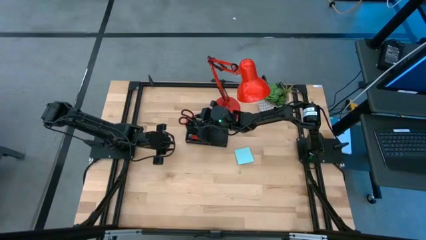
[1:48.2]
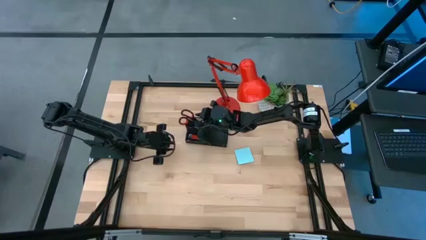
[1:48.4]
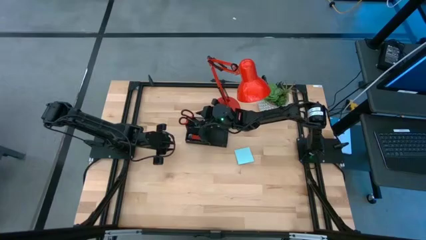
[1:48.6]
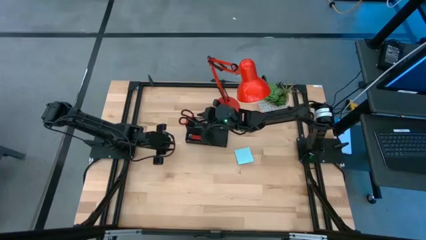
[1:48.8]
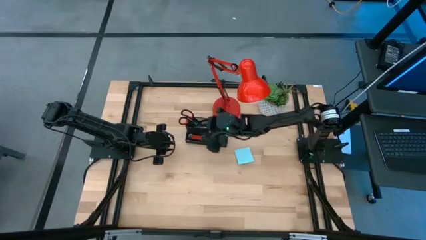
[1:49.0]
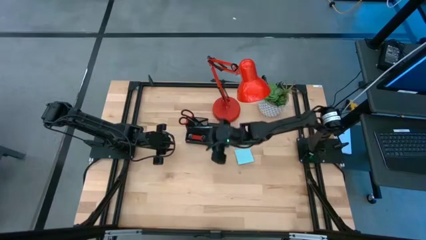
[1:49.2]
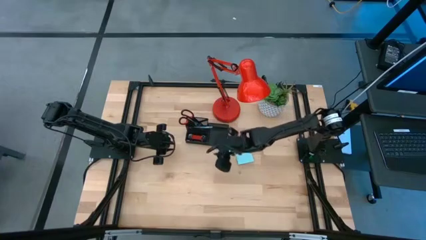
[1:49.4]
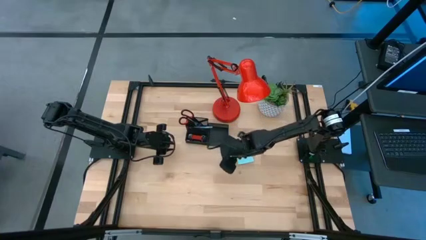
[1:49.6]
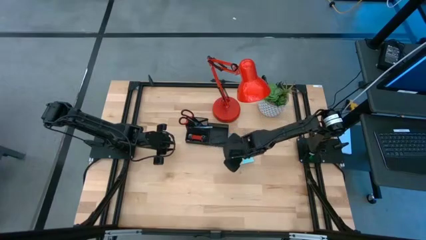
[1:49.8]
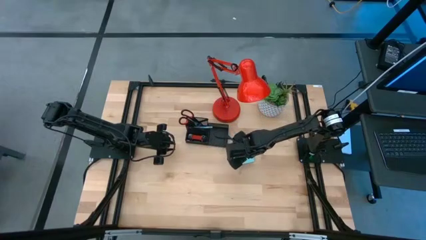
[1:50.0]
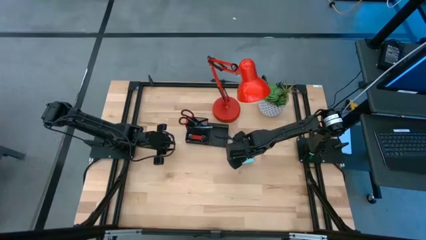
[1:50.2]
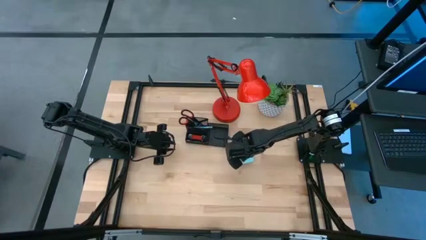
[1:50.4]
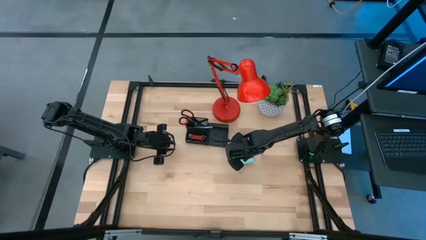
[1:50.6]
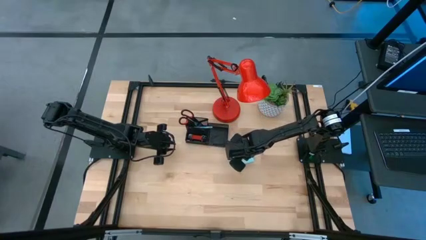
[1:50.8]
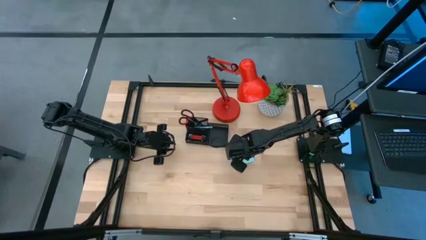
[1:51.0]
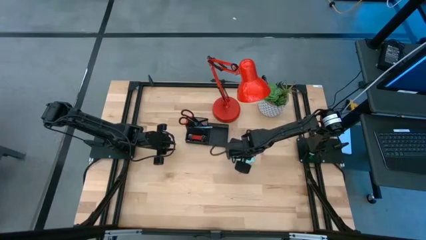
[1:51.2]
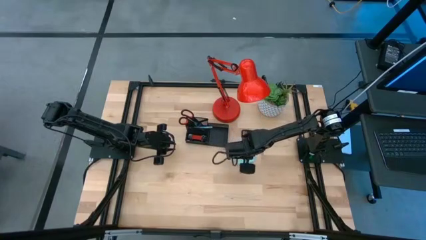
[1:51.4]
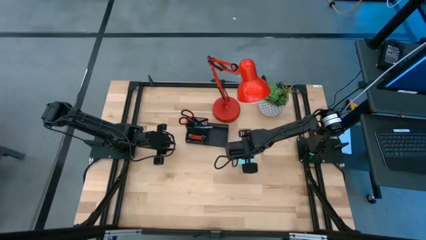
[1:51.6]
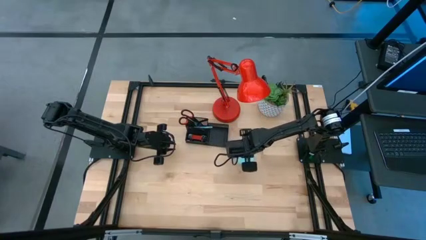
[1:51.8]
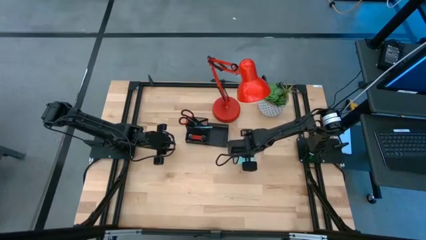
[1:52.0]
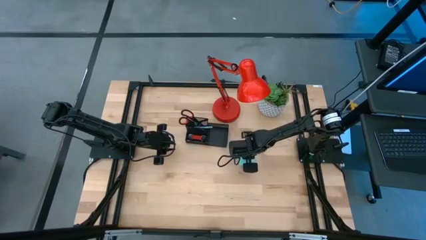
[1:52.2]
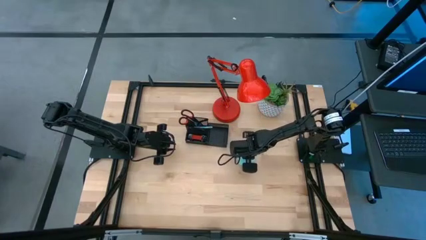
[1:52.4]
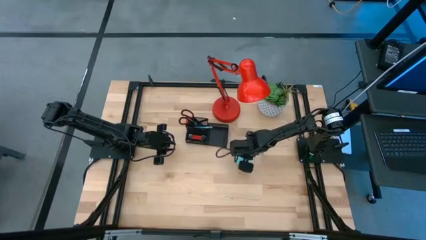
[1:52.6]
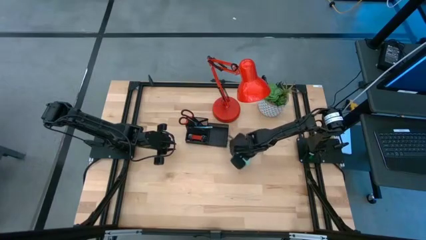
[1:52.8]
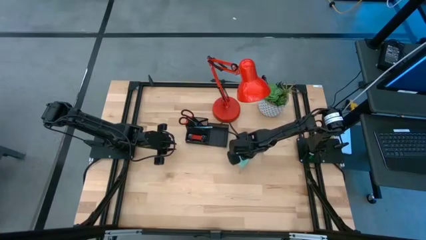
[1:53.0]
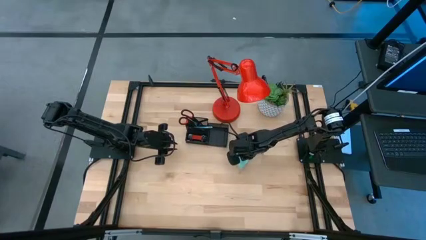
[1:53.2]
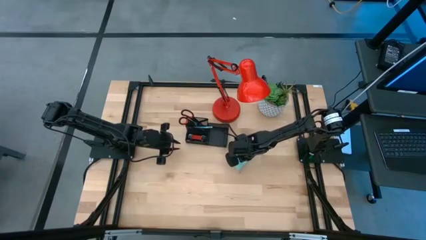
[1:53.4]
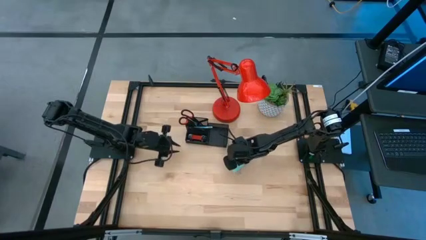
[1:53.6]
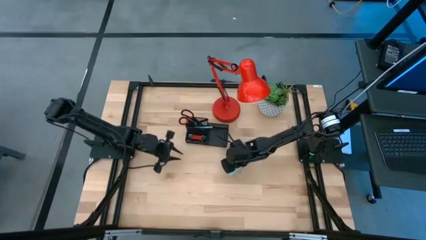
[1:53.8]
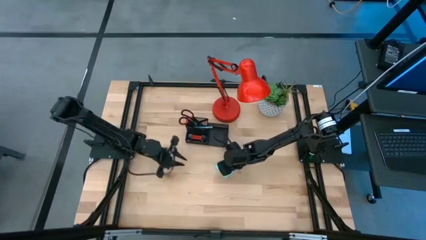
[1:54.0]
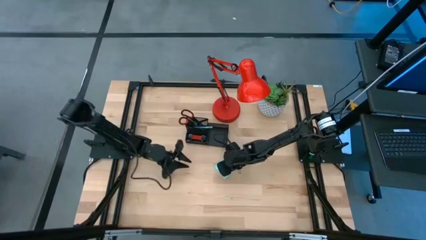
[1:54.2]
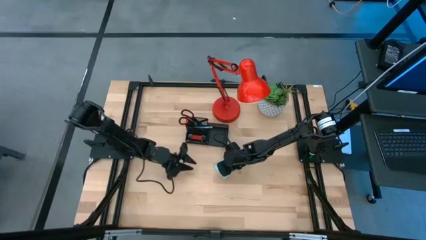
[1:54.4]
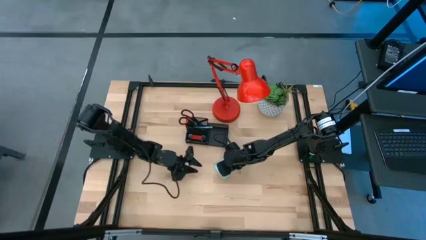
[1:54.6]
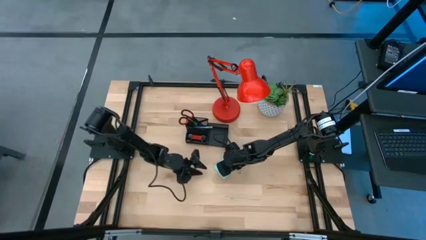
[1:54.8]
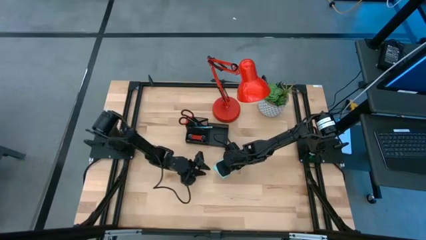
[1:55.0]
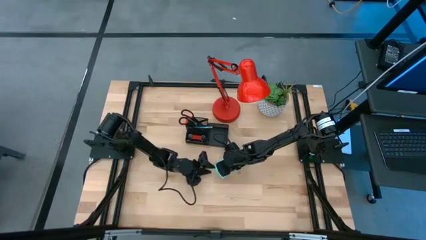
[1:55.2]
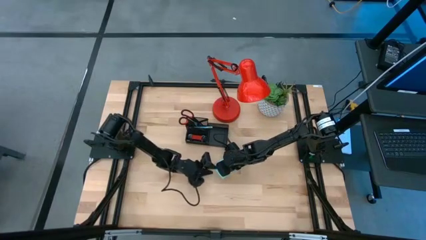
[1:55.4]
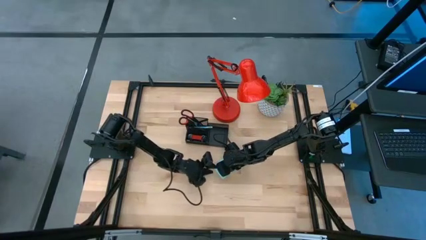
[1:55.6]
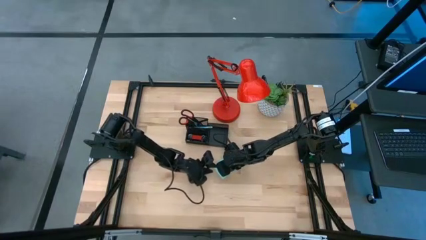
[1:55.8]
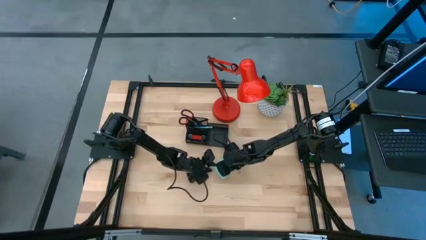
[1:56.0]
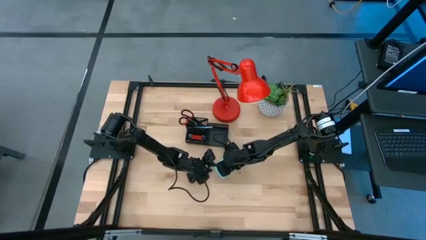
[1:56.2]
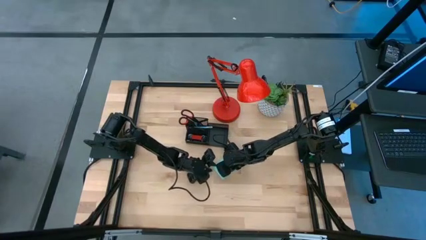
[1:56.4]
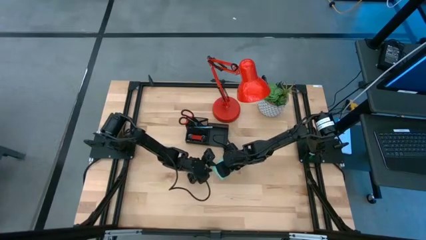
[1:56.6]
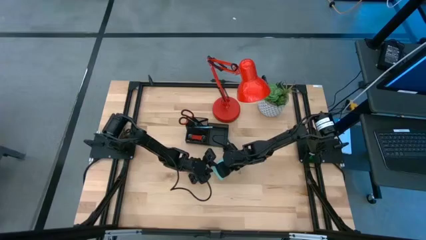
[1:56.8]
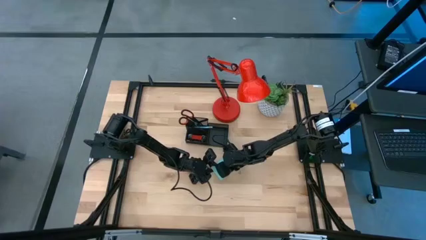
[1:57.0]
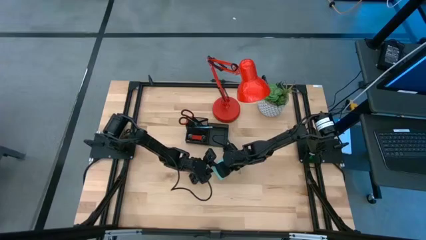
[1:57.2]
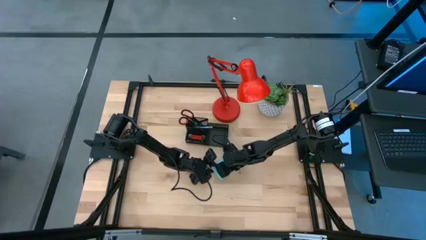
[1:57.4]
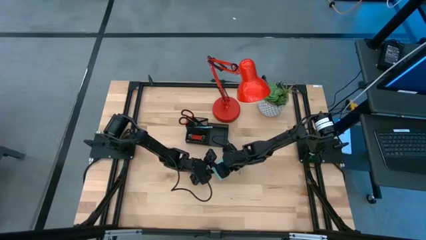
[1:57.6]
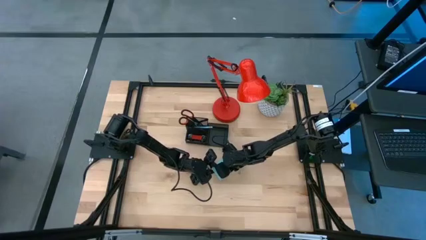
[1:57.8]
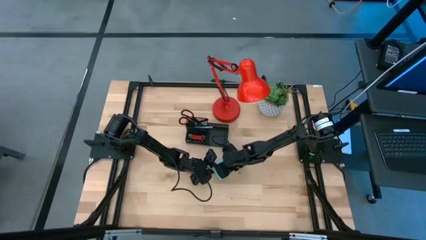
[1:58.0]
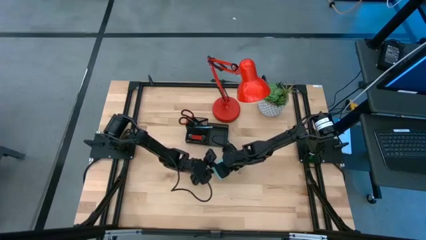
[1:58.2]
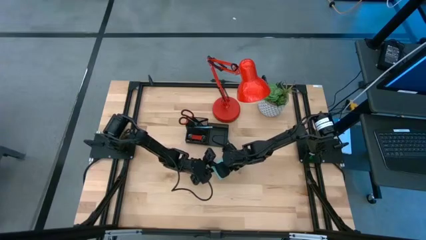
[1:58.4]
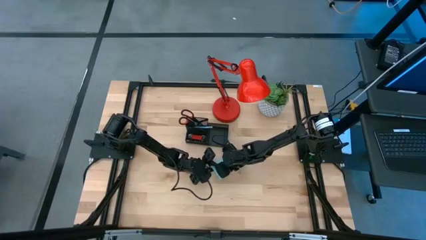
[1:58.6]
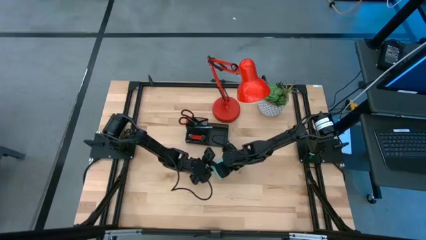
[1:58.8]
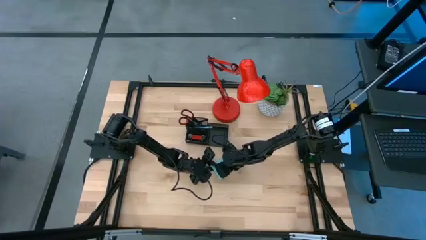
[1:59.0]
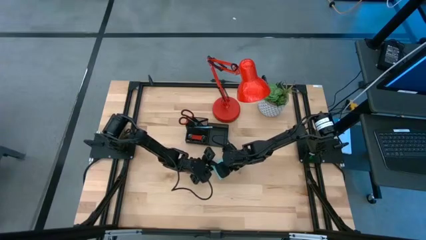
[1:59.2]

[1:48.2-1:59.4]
Task: Pick and place office supplies into organizer
Put the blue sticky note into the black desk organizer

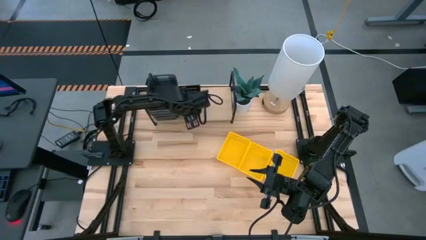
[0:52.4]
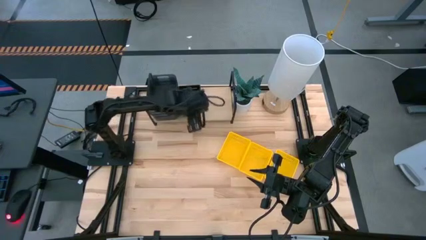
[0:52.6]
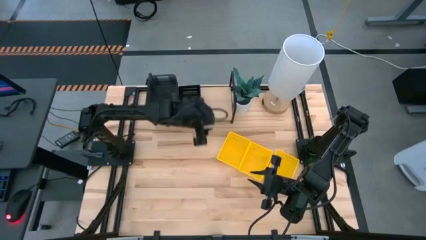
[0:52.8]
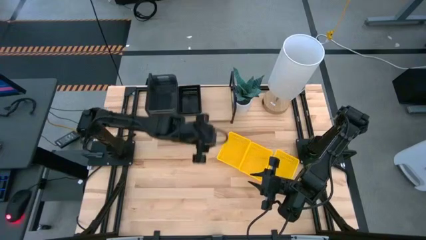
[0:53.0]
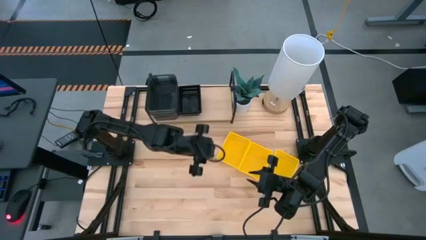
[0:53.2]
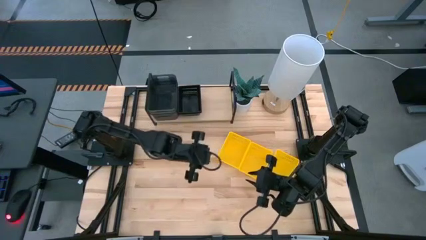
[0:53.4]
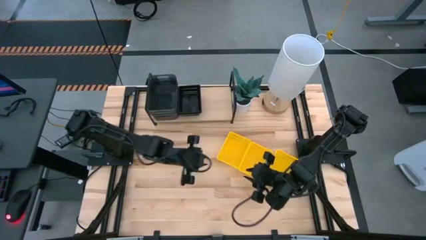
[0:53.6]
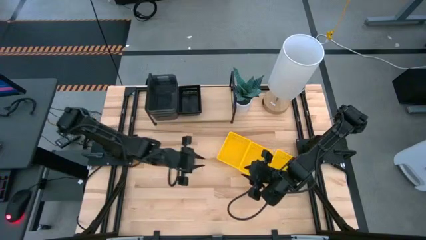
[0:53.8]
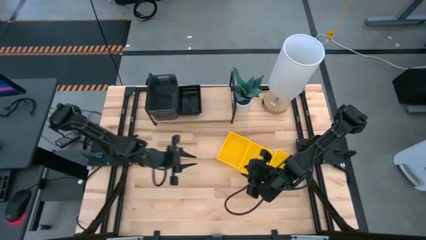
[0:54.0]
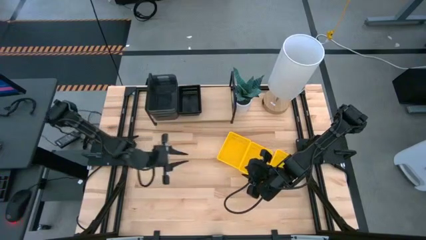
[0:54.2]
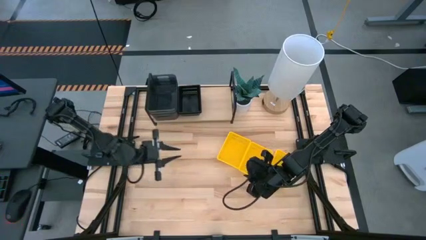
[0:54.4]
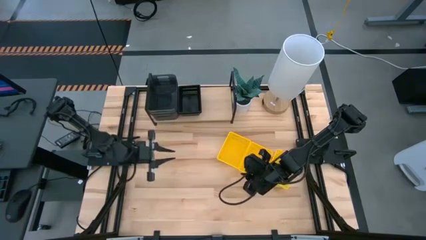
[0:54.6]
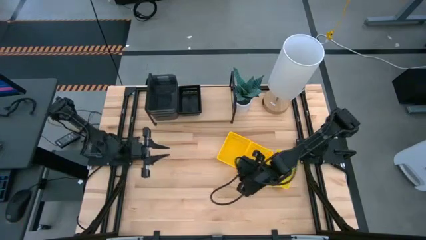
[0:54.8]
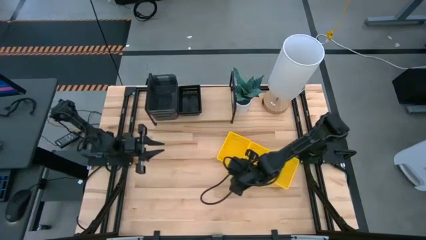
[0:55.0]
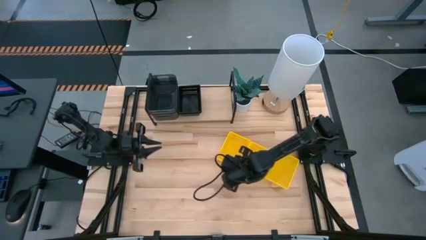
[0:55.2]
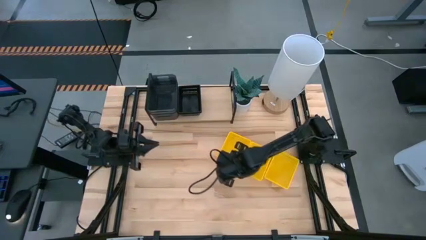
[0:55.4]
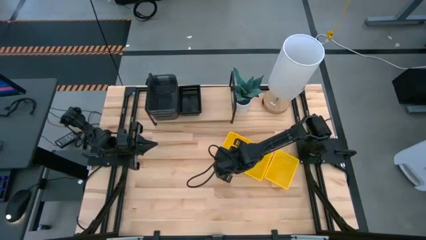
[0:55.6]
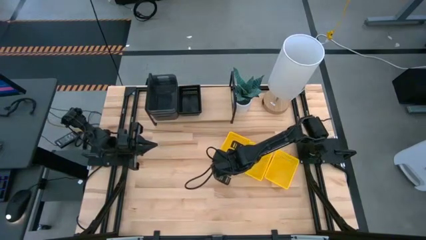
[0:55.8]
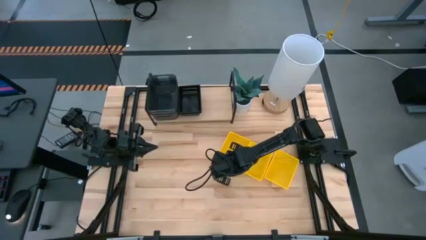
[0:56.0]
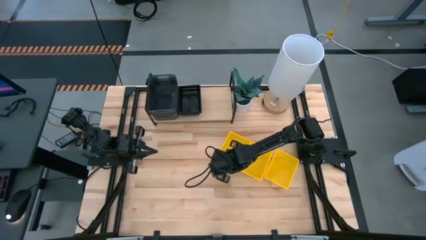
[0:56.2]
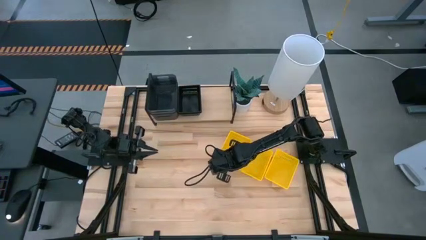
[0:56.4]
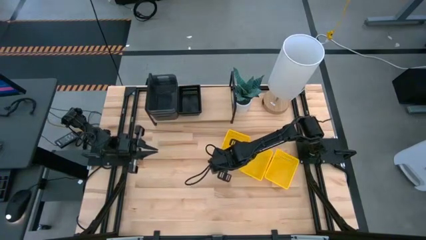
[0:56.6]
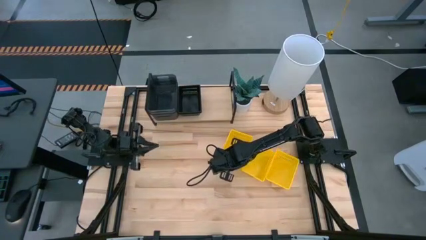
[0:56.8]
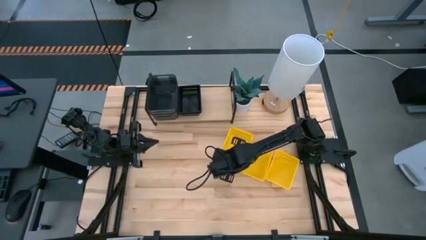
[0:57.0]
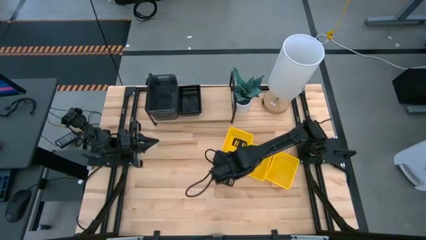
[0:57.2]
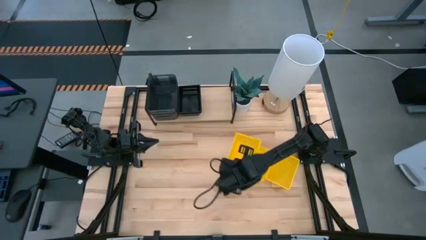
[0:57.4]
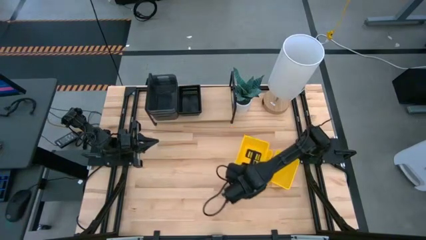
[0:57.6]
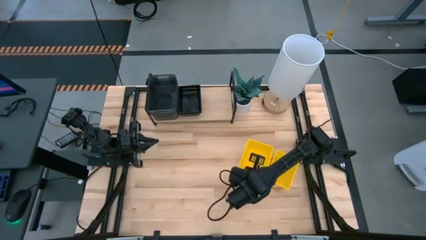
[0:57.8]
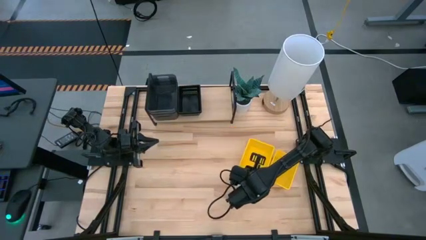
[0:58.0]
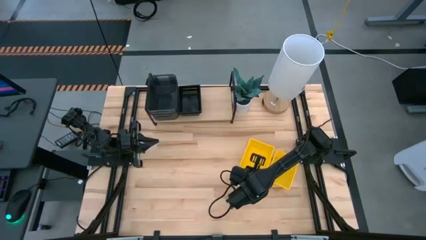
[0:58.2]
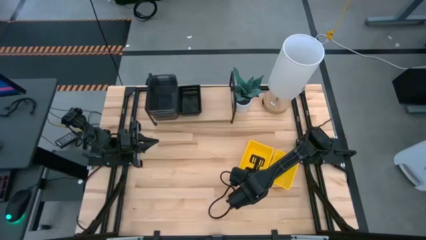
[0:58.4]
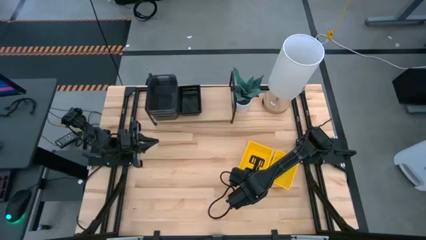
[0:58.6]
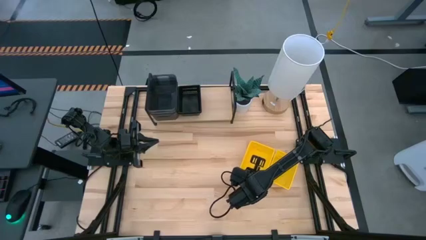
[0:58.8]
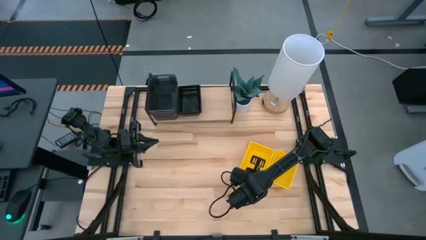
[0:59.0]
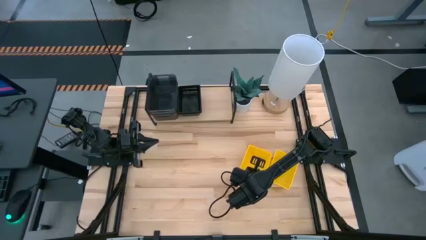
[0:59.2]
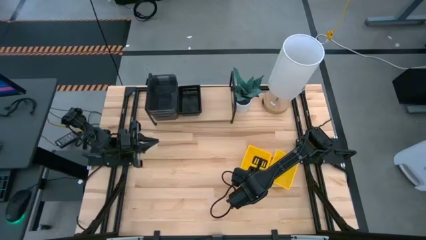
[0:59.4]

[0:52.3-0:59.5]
Task: Stack baskets on shelf by color
Stack the left yellow basket on top of the middle yellow basket
